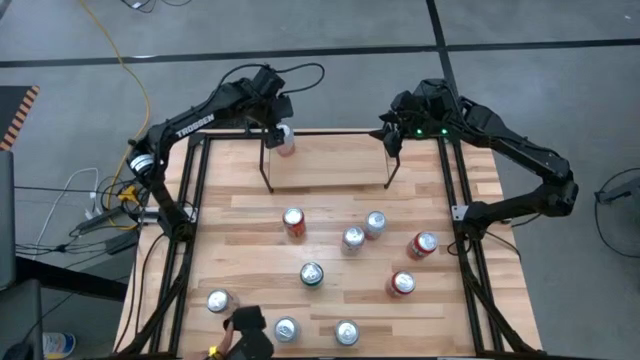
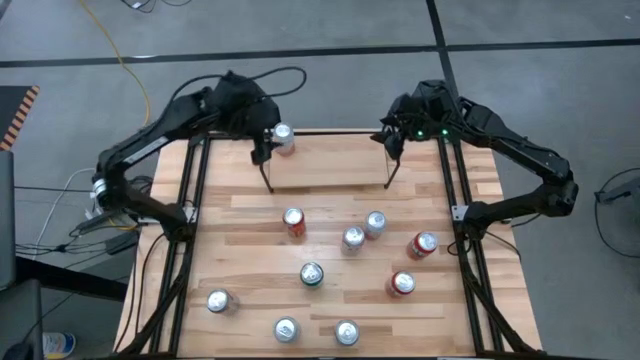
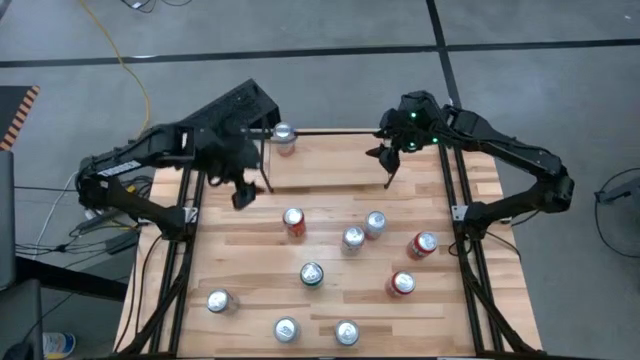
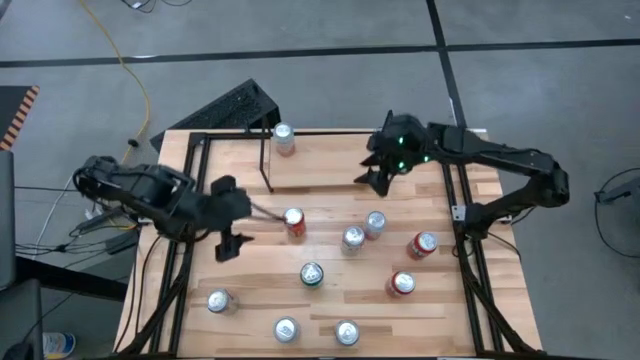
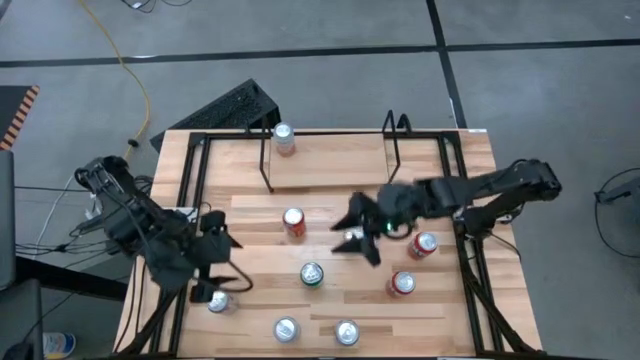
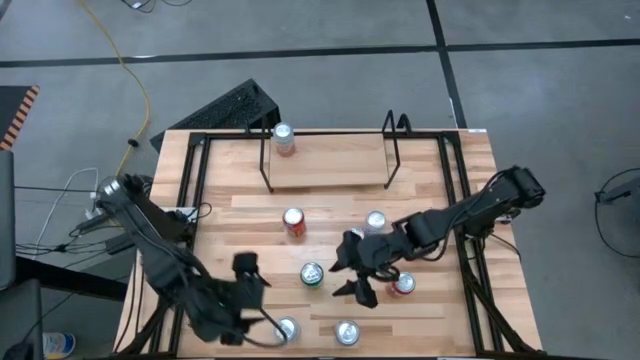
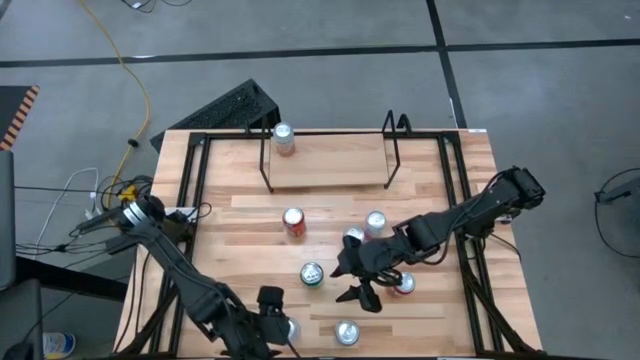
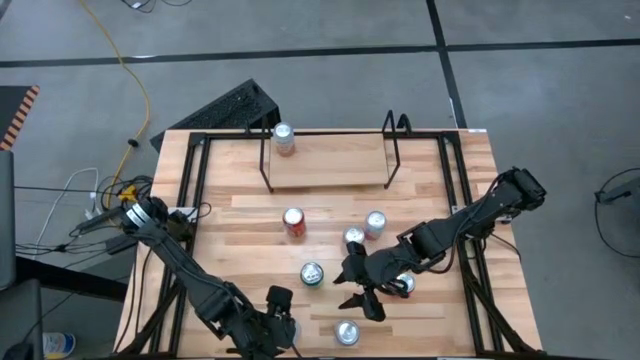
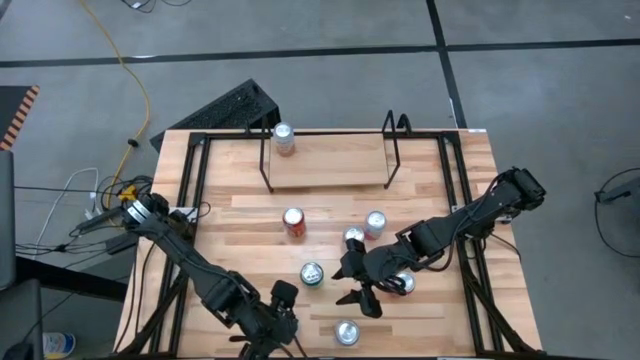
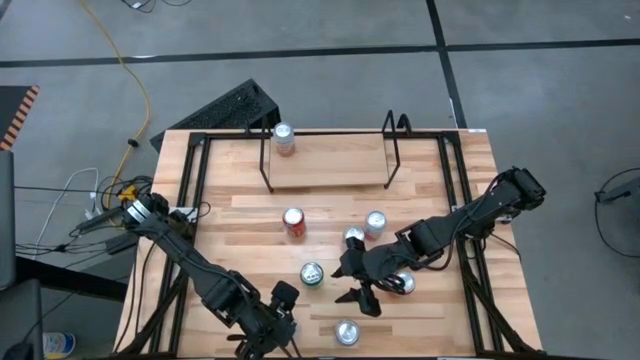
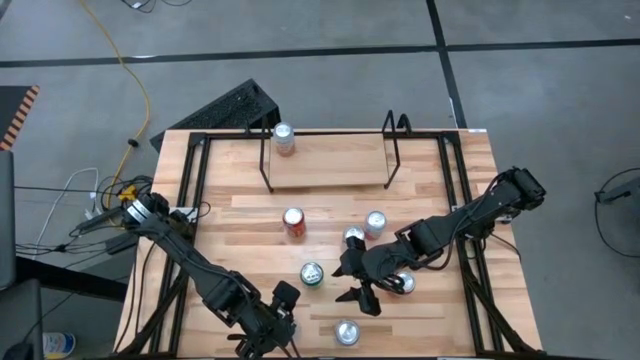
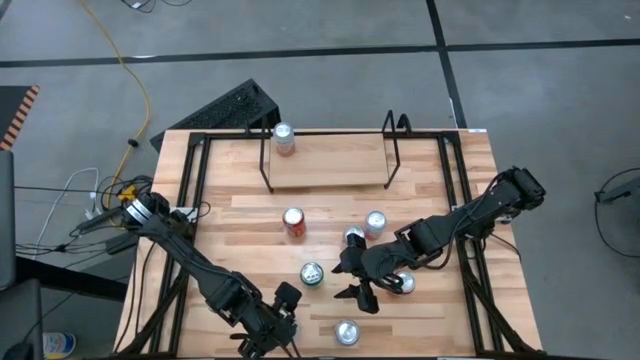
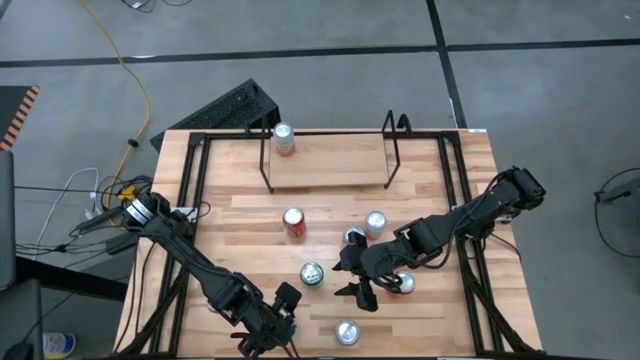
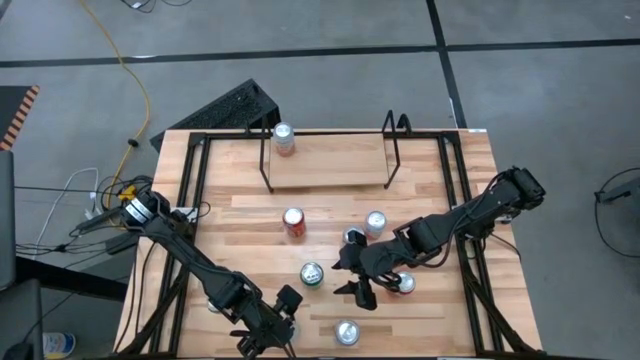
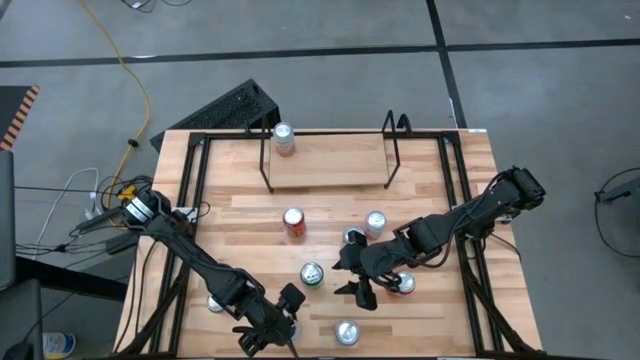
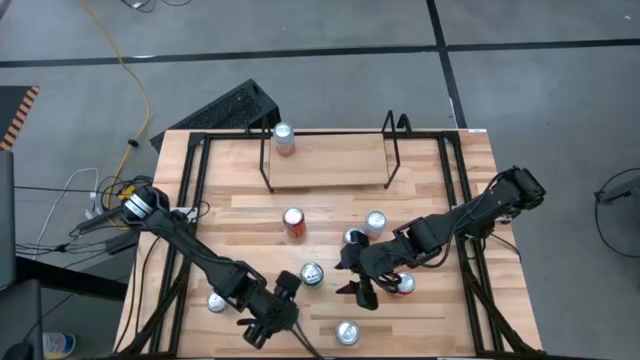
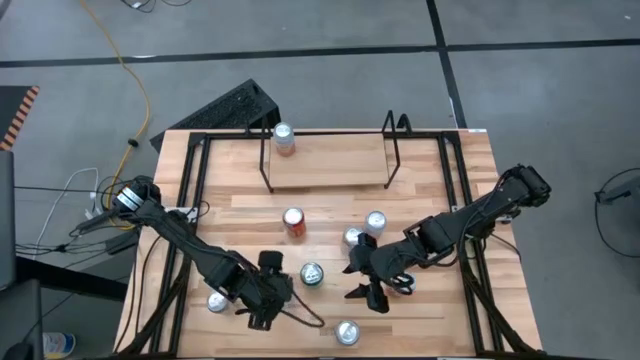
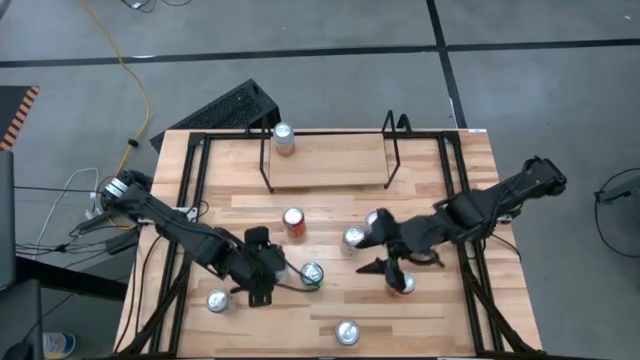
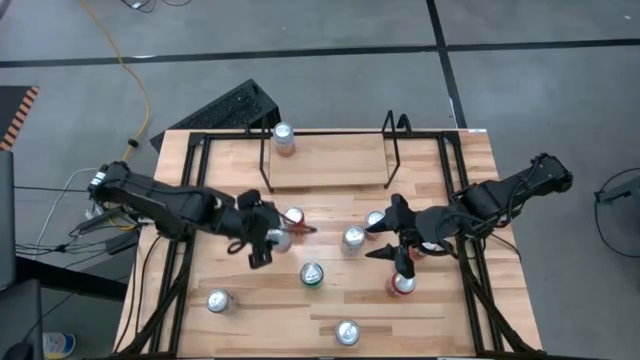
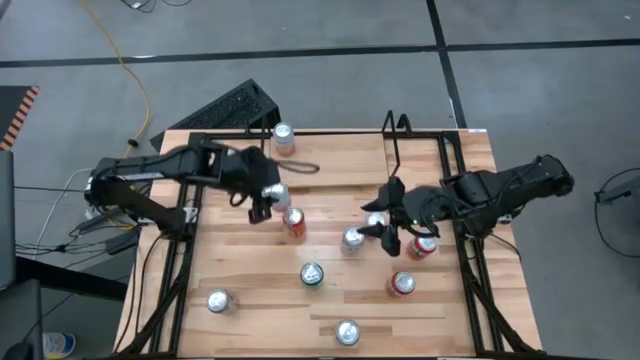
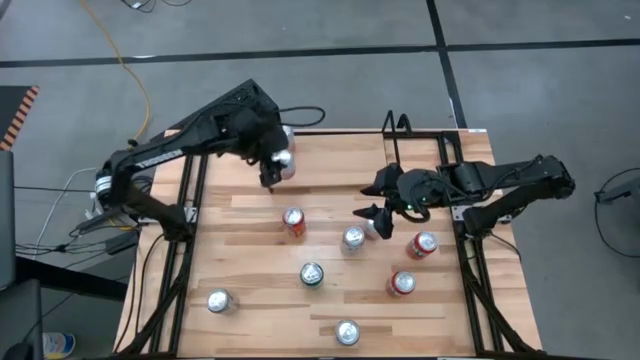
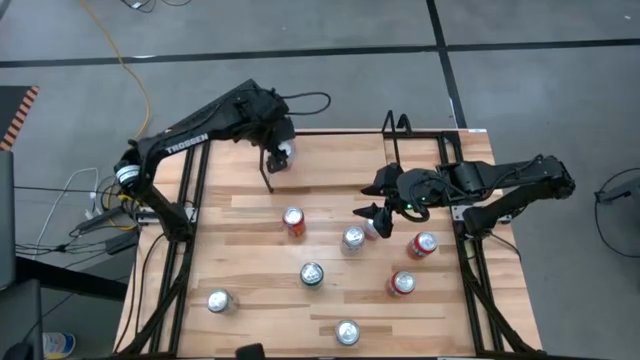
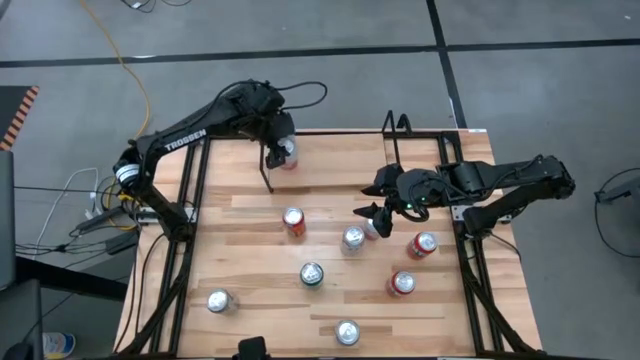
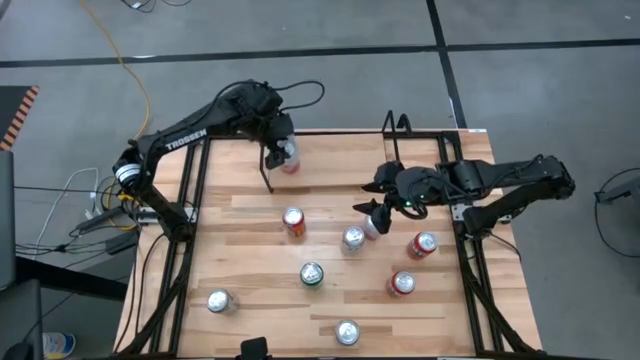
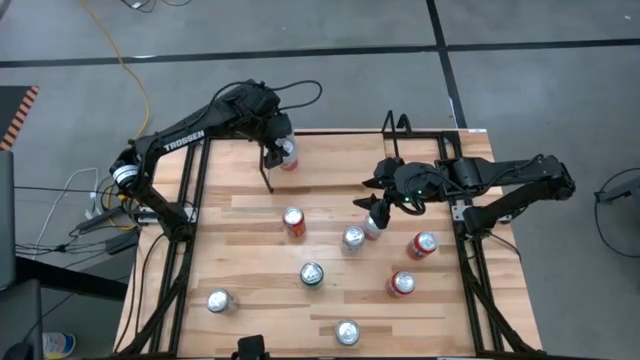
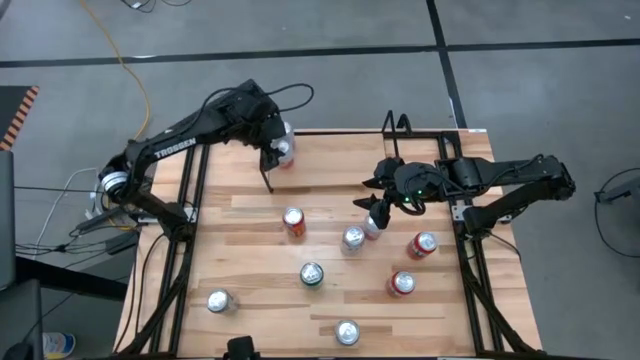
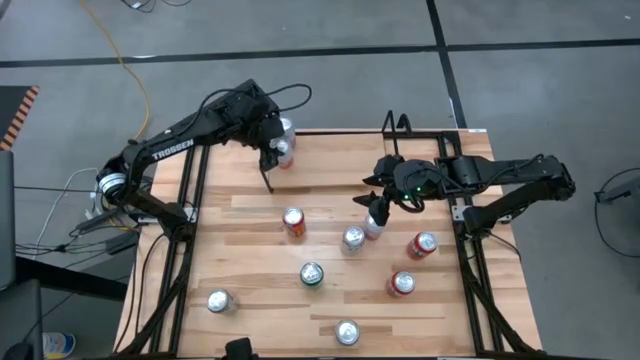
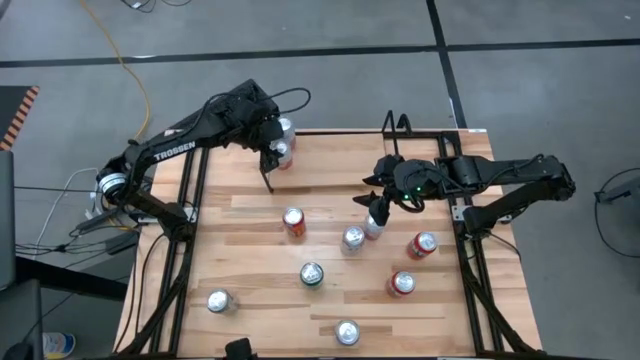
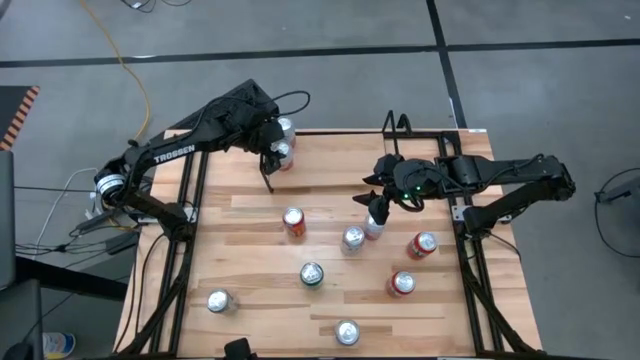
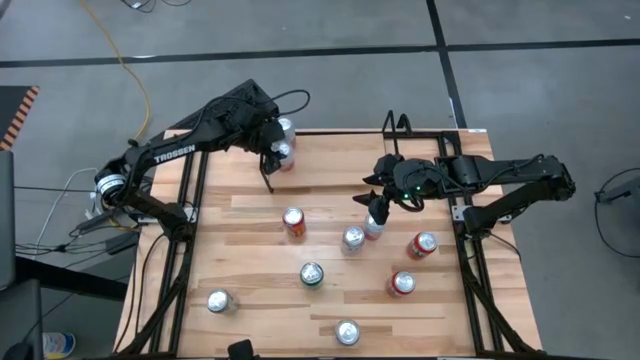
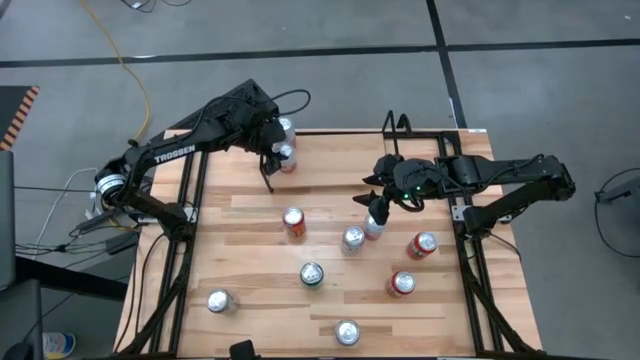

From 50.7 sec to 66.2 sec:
Task: Place canned beverage on shelf
Put the bottom white orange soda can on the shelf aligned with the other white orange soda can
